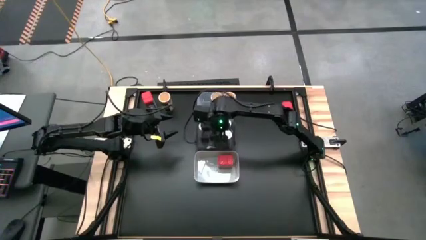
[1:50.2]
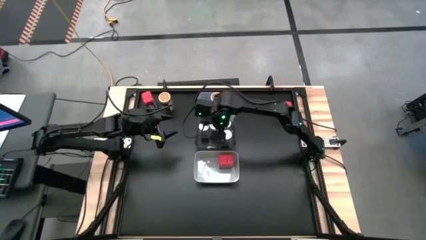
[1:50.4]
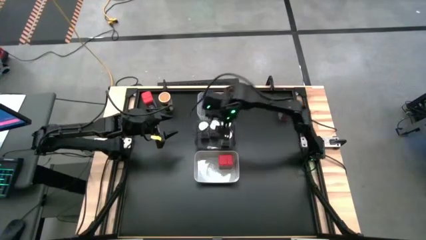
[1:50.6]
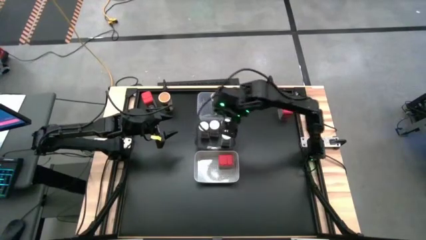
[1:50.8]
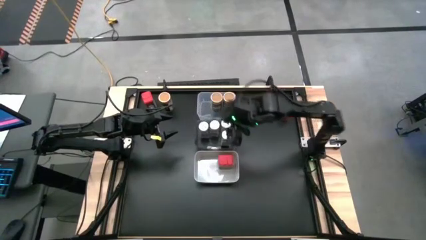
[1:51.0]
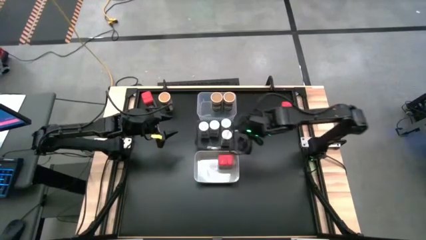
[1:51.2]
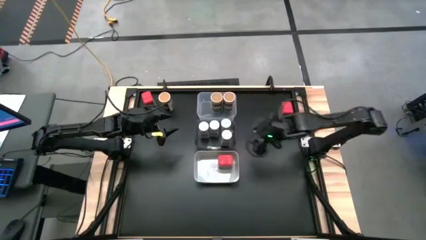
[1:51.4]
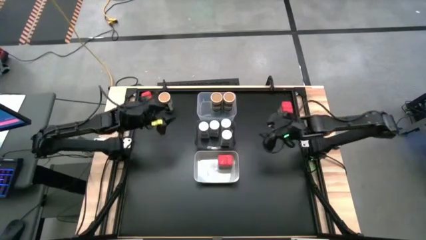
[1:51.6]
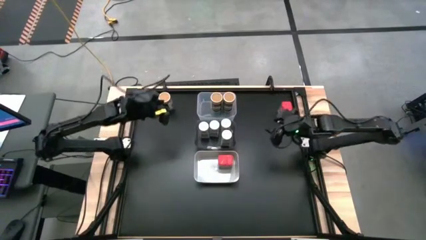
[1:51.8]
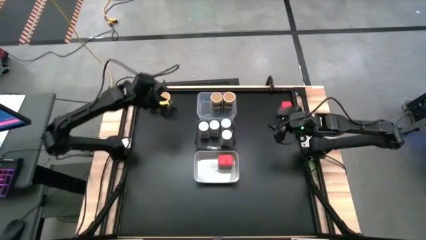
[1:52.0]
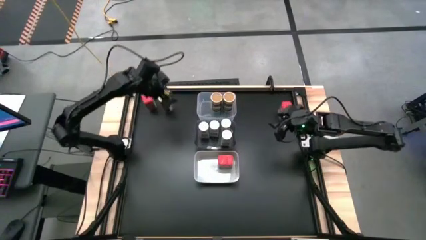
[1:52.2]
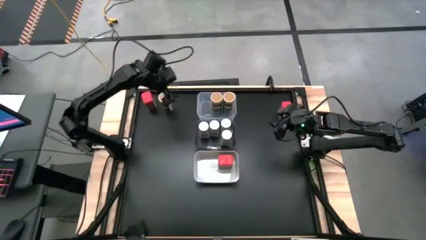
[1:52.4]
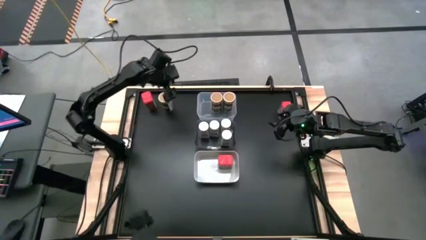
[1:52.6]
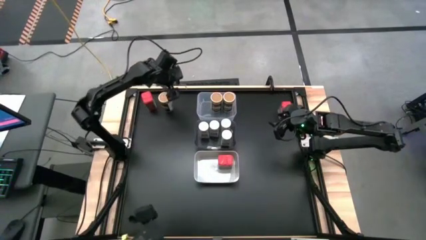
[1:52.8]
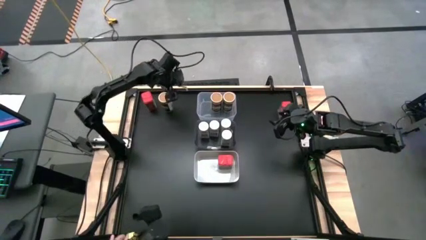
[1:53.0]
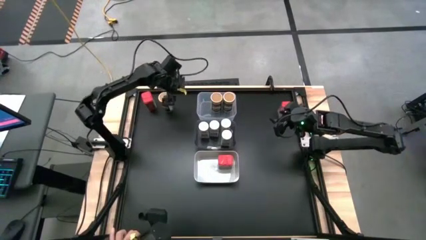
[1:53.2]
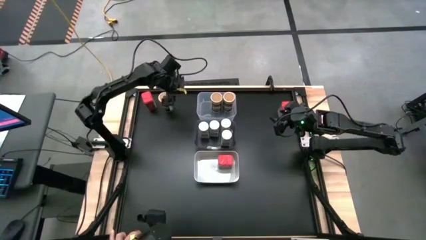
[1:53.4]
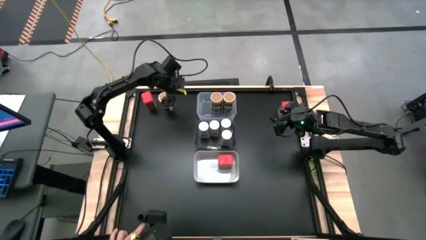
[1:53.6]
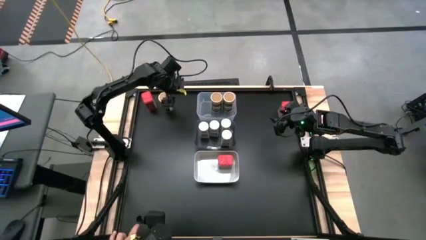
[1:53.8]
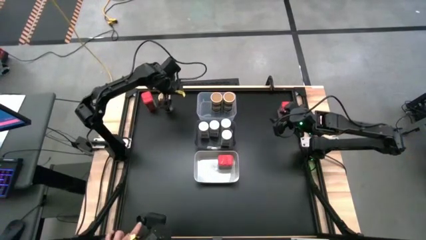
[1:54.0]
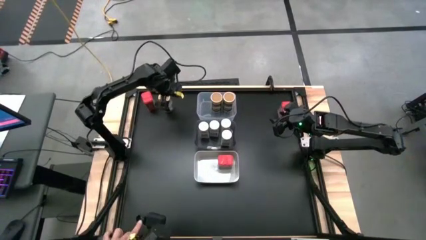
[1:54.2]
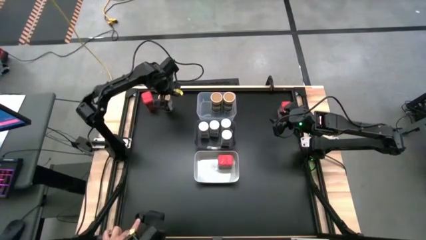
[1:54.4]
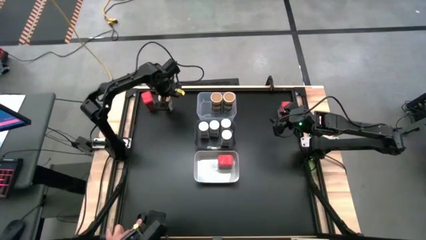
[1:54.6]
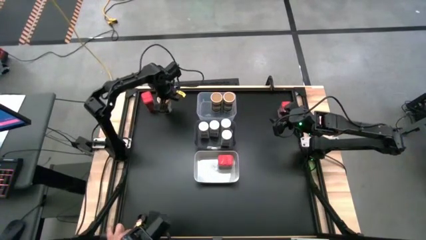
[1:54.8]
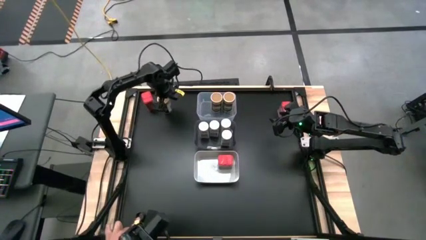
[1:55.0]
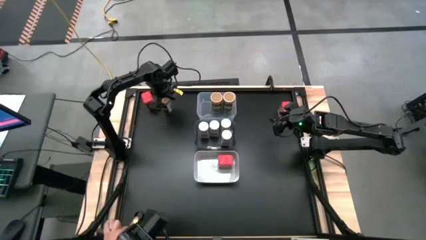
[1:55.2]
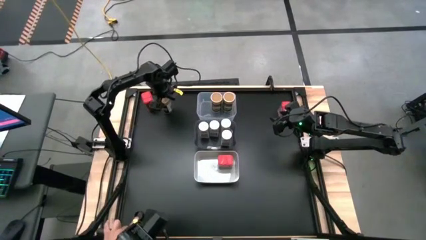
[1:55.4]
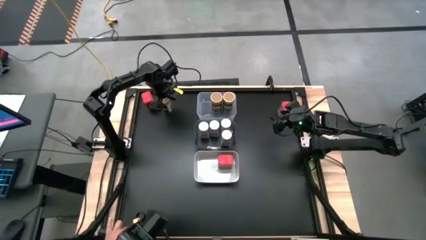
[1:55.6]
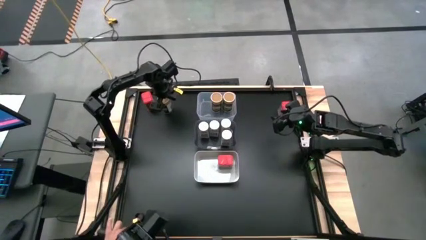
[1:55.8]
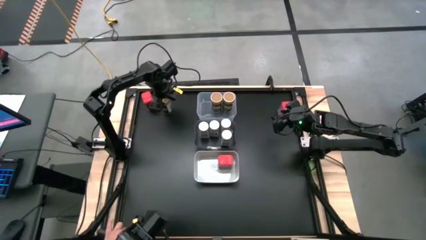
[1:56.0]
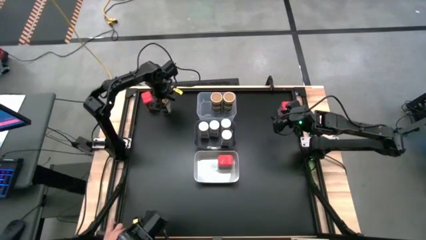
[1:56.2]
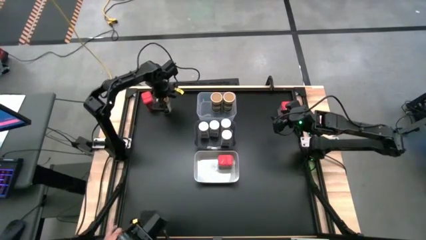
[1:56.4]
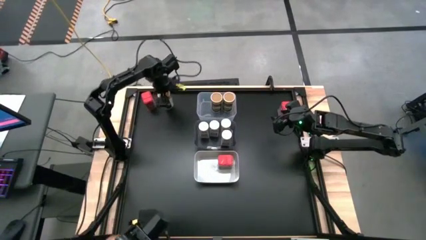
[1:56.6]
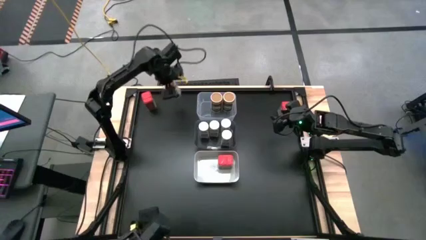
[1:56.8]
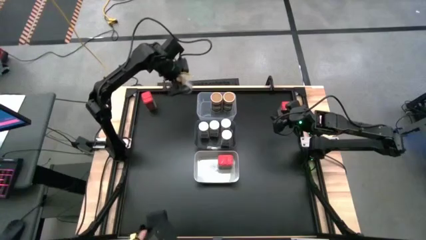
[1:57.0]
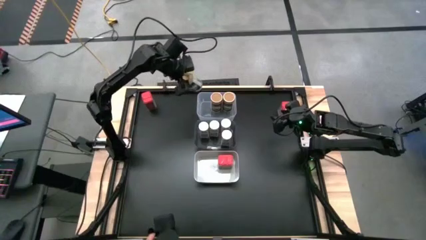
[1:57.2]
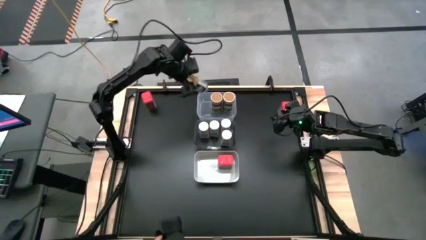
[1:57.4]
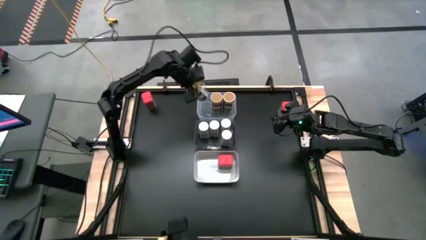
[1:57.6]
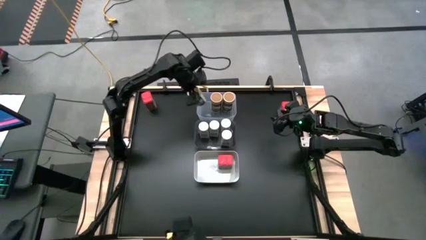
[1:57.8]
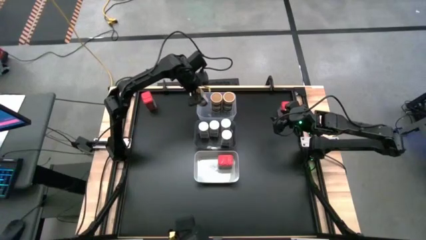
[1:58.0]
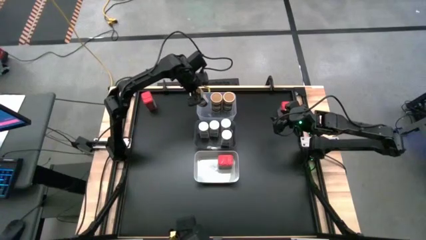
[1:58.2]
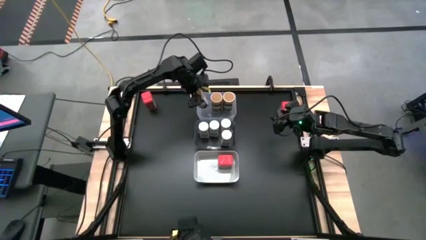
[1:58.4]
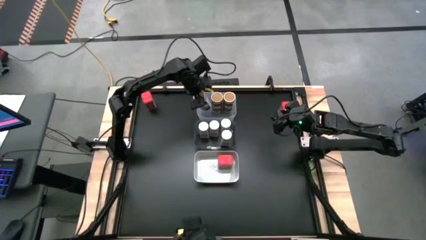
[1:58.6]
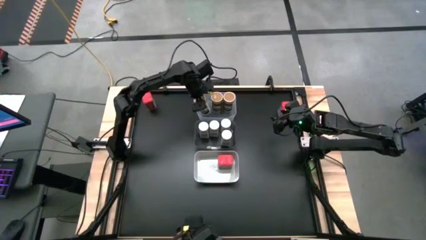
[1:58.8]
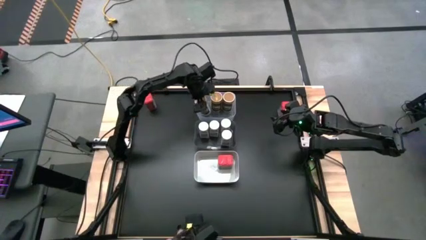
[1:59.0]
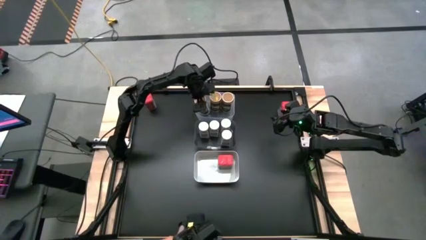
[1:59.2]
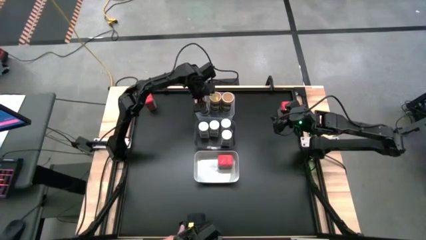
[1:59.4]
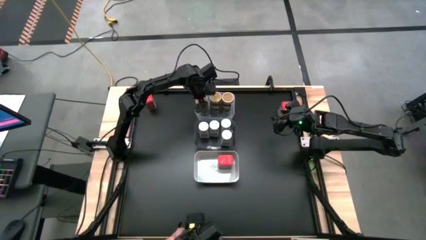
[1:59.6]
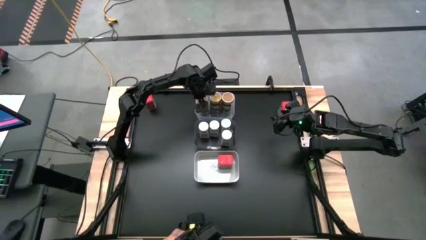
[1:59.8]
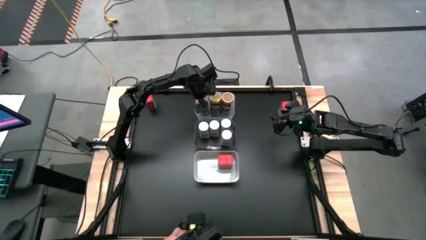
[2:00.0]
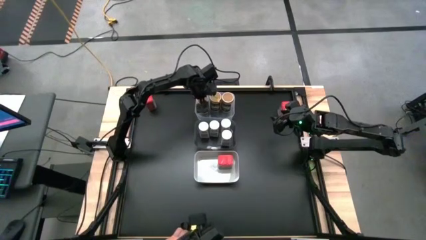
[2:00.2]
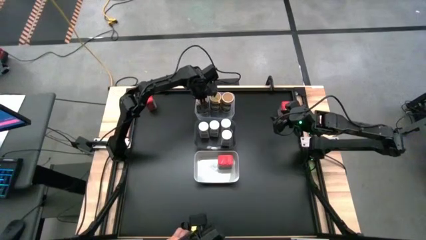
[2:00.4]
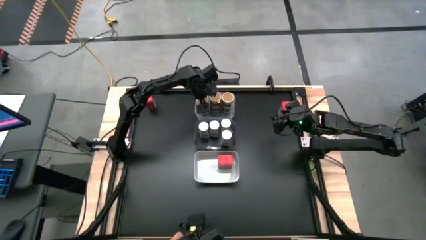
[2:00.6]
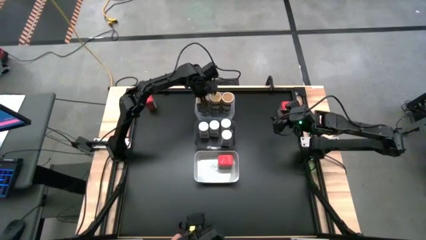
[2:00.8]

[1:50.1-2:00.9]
Task: Sort spices by type
Put the brown seasoning bottle into the white transparent bin aligned with the other brown seasoning bottles
